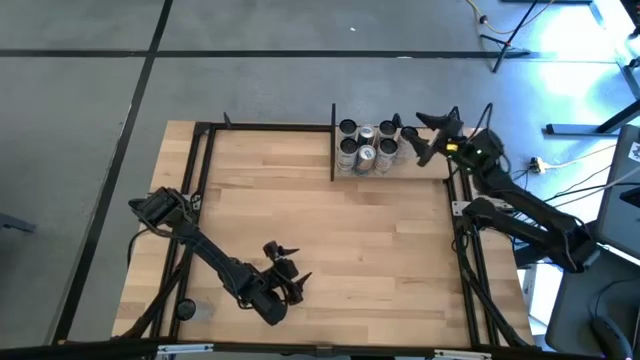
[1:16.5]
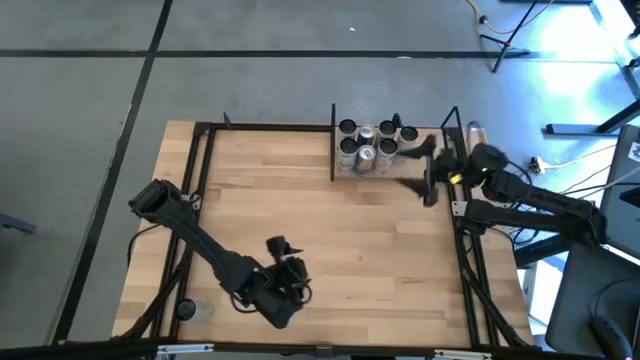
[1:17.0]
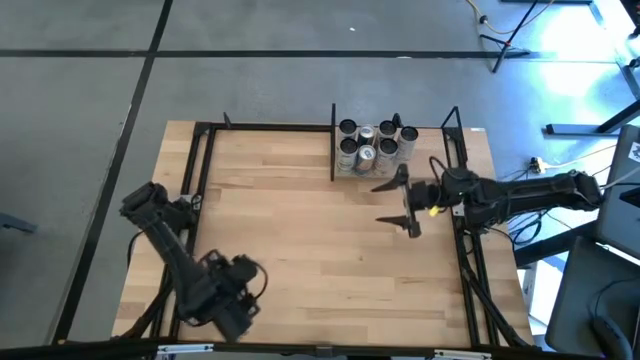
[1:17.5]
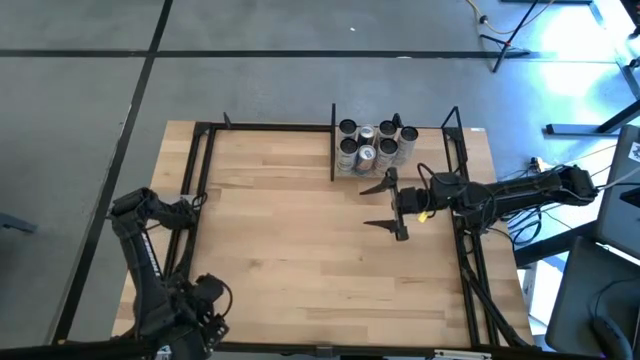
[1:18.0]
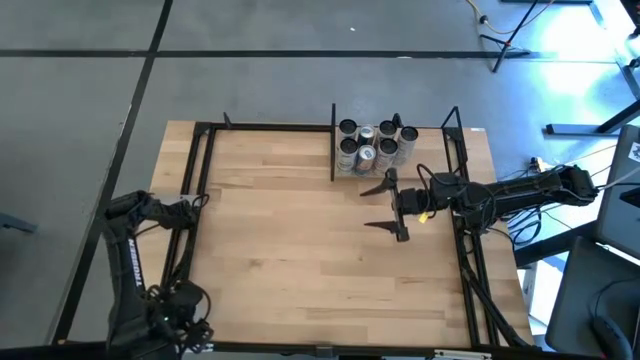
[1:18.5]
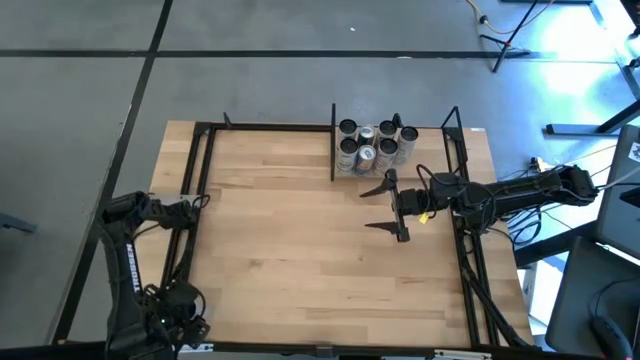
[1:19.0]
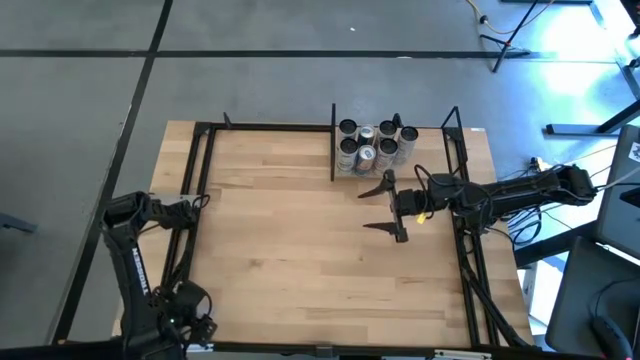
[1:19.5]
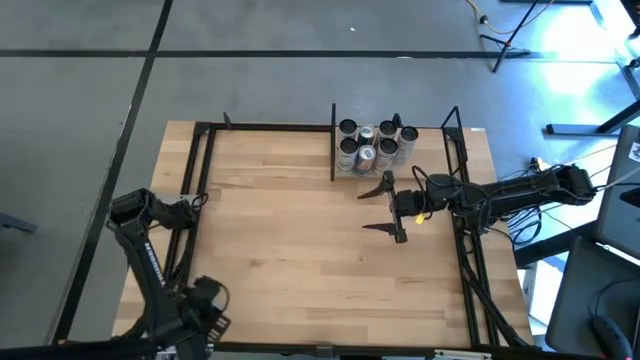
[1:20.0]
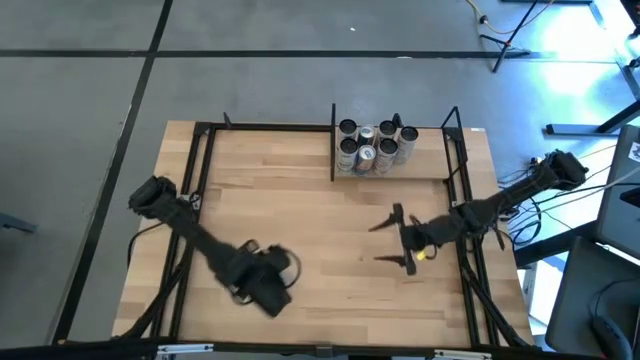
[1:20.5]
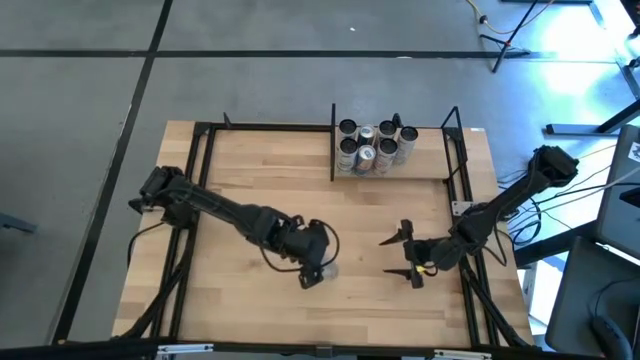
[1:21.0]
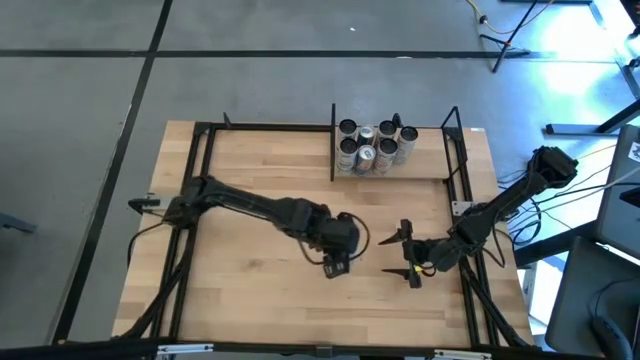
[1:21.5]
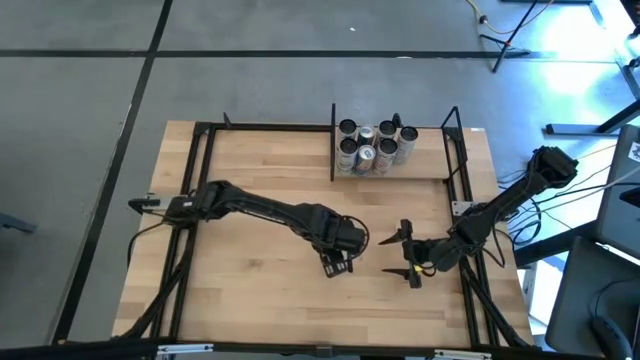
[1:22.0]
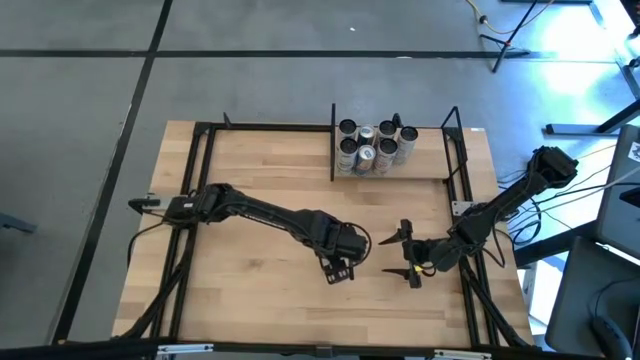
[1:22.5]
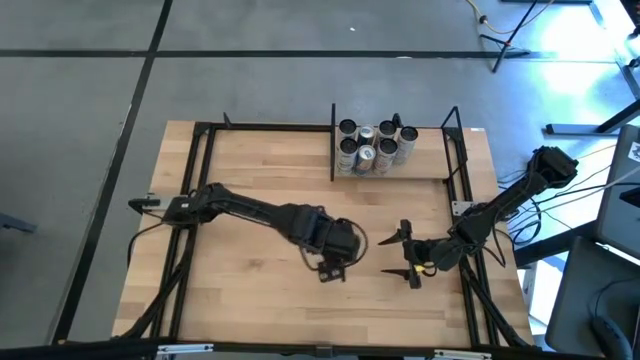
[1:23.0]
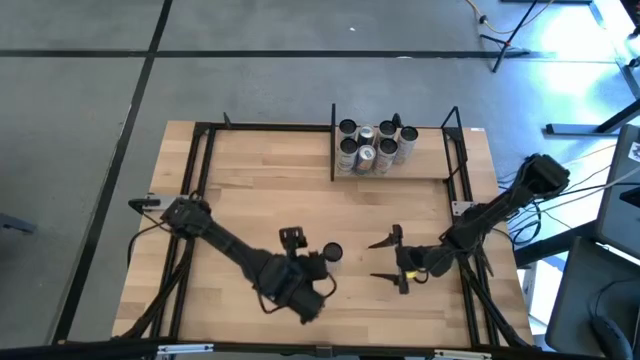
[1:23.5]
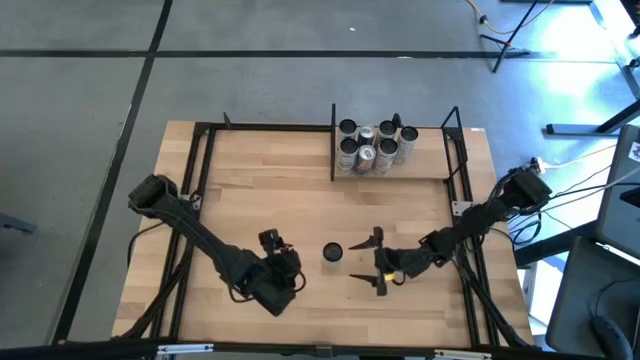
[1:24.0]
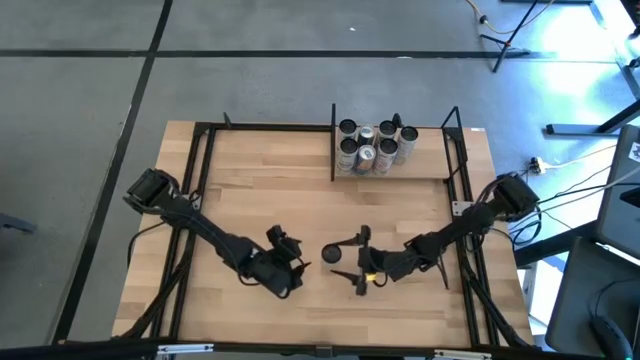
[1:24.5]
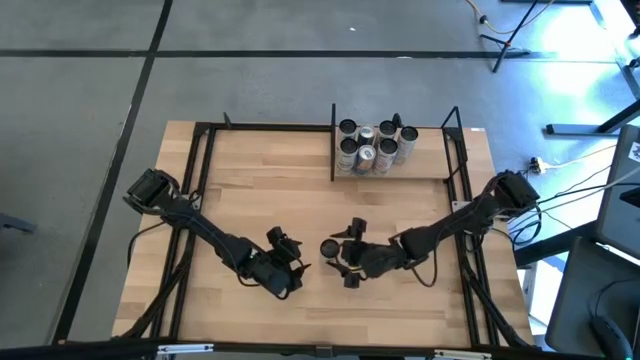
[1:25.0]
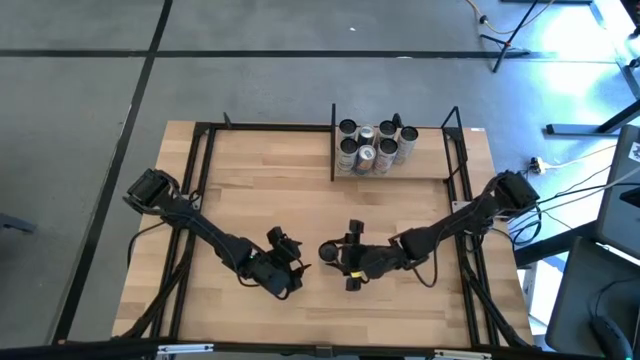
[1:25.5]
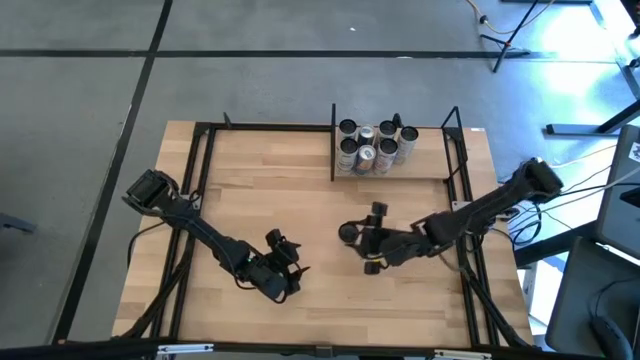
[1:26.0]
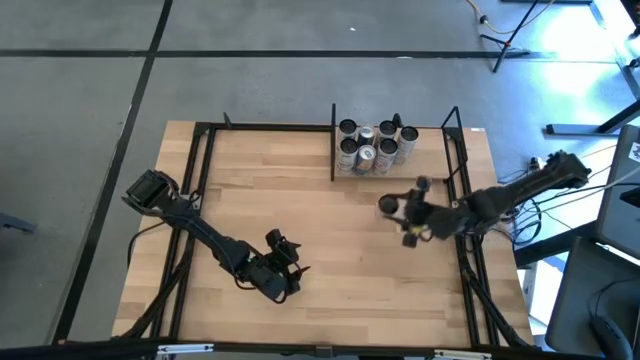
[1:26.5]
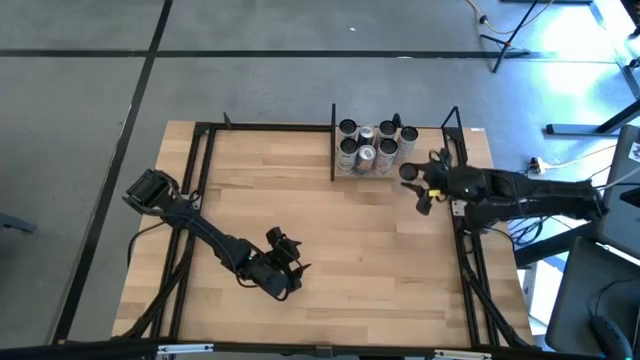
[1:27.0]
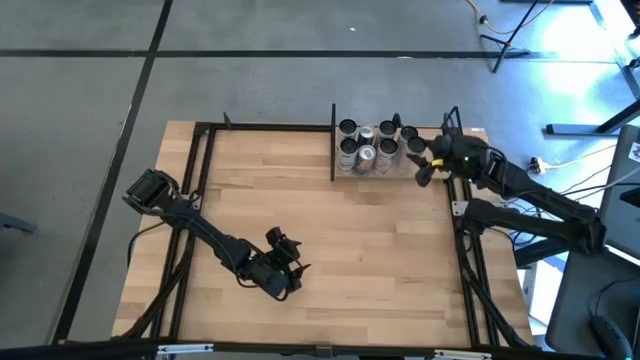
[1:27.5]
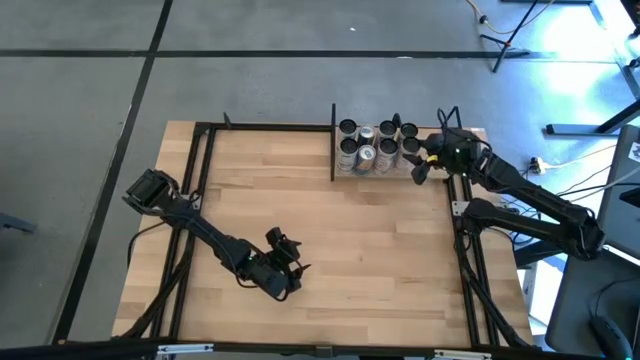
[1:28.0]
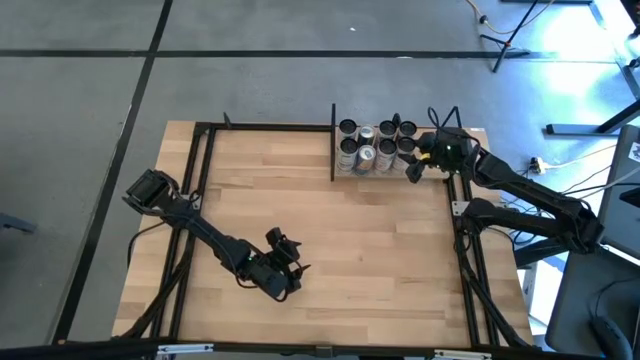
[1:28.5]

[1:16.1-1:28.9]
Task: Place canned beverage on shelf
Put the black soda can on the shelf aligned with the other black soda can

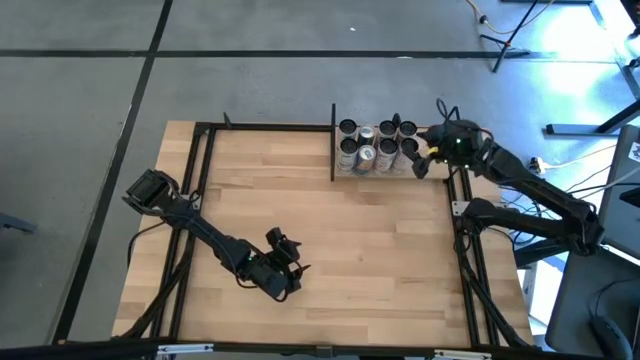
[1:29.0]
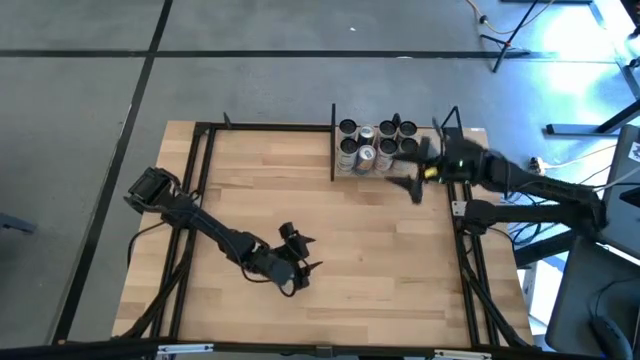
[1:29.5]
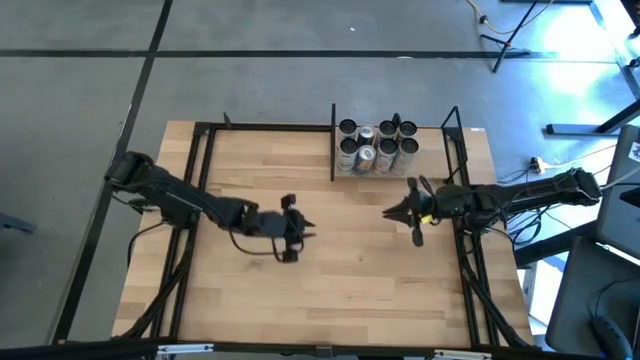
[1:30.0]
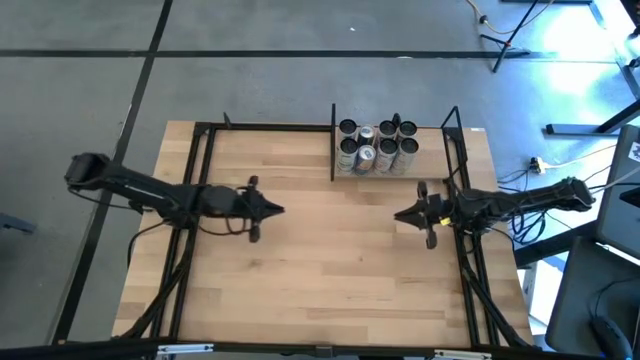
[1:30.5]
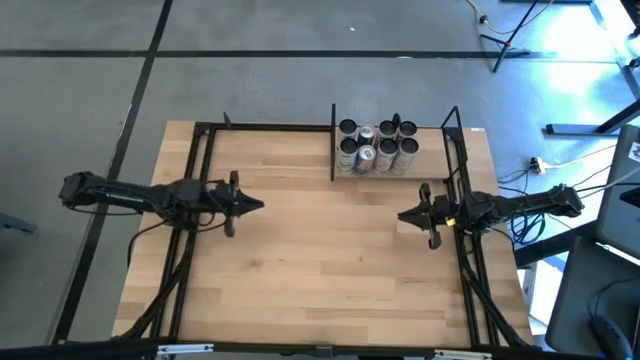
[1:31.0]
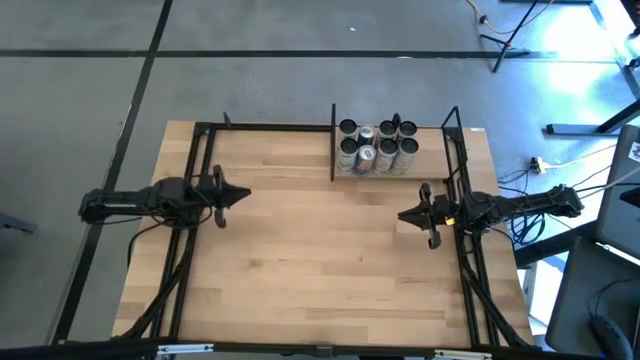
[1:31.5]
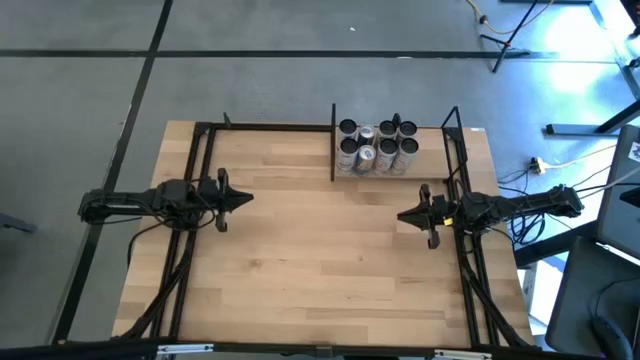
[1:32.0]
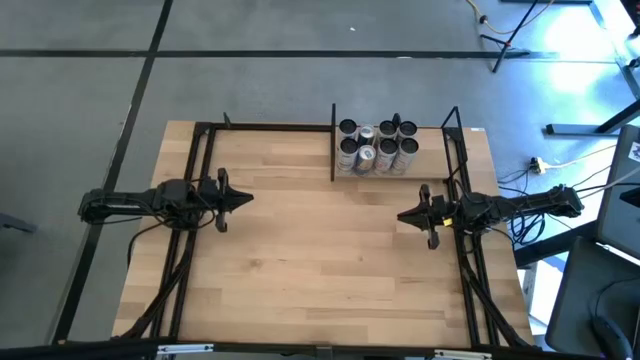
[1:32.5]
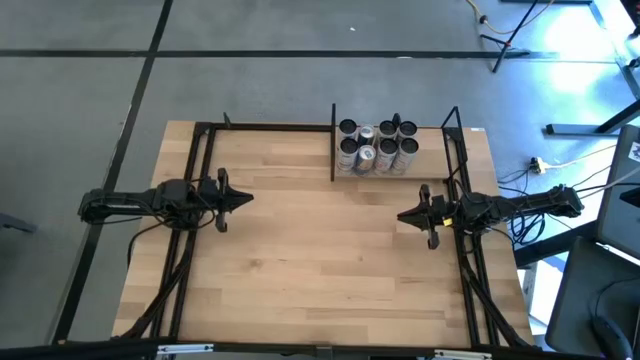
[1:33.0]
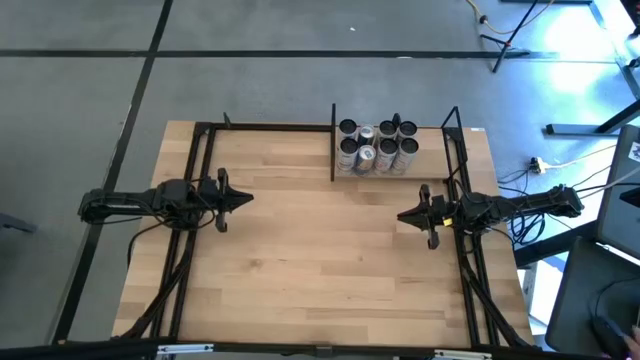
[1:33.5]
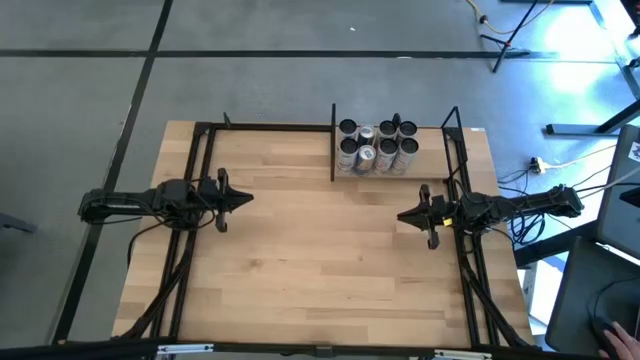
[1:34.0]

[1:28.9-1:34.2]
Return to Home Position

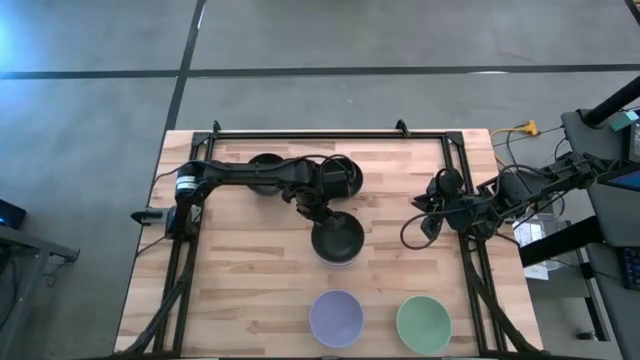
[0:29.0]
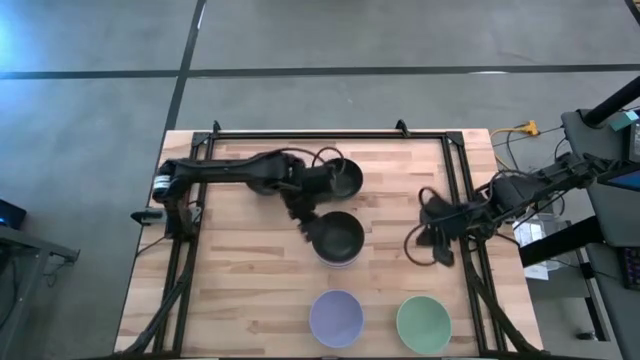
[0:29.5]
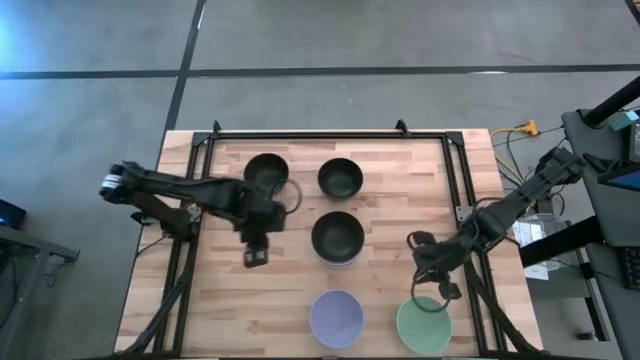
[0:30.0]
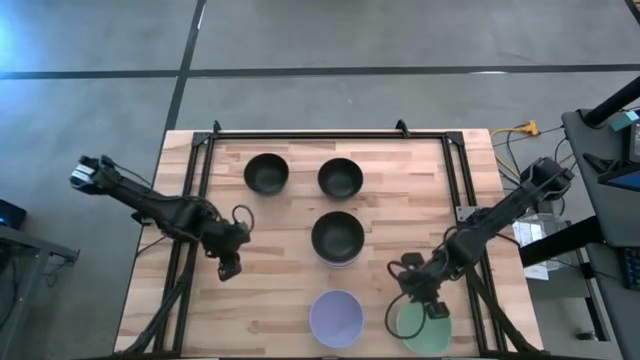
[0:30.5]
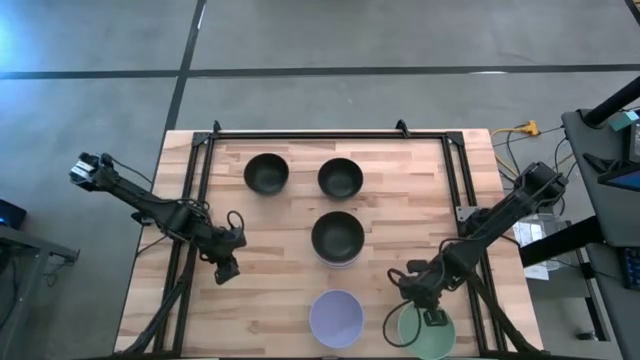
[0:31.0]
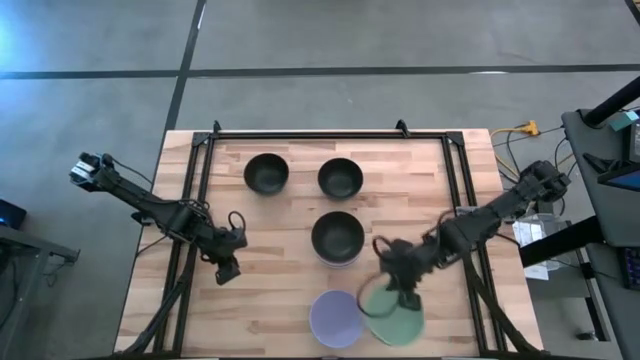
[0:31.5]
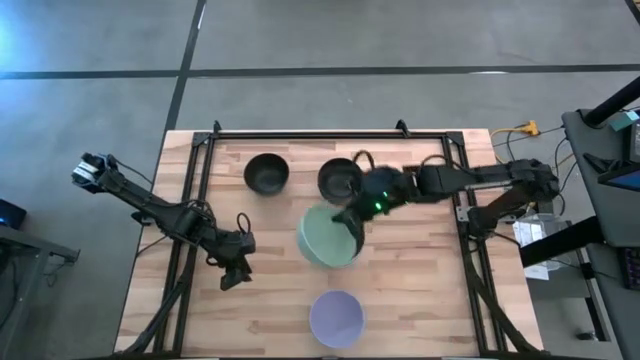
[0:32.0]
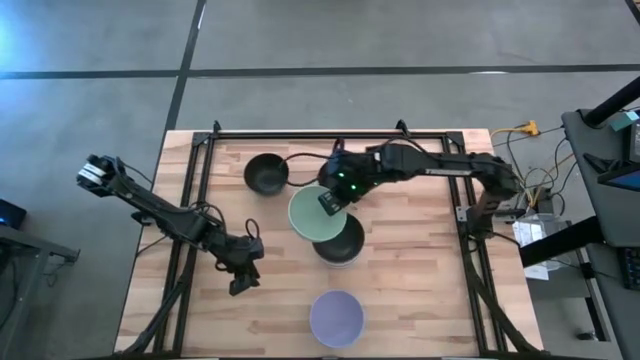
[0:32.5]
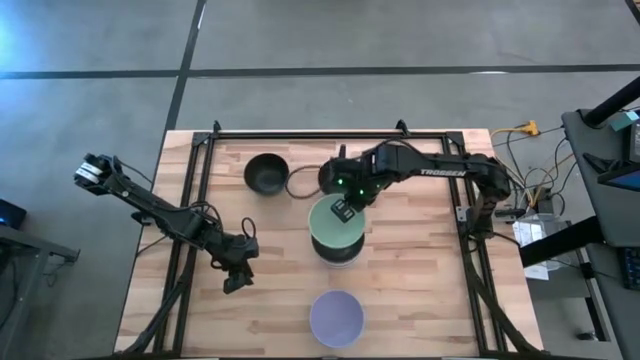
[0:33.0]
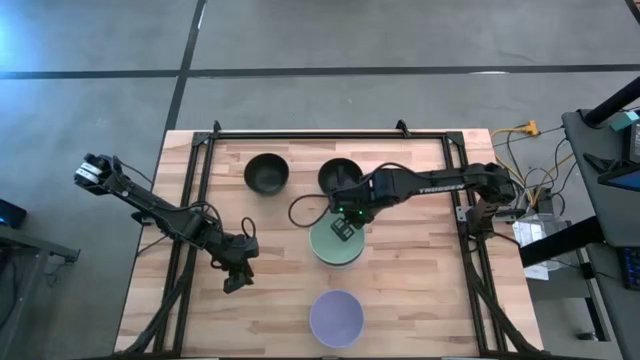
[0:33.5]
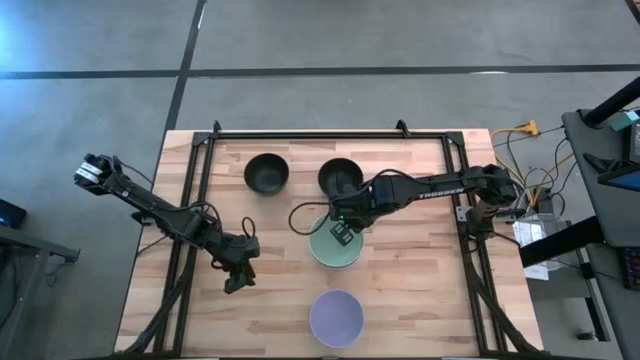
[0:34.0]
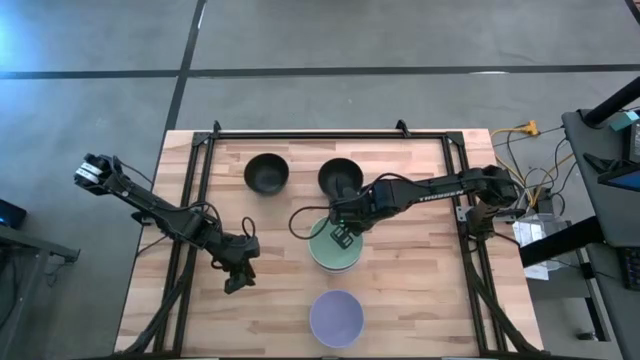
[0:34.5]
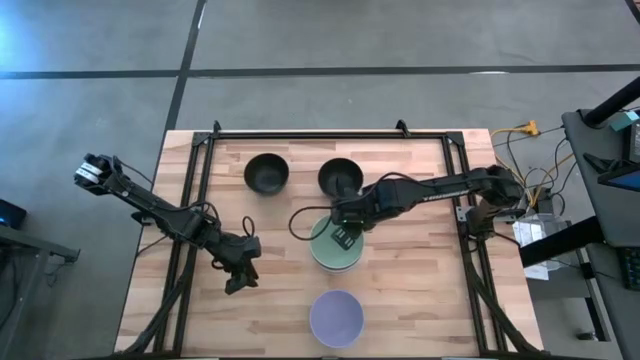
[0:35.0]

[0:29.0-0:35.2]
Task: Nest bowls inside each other
Stack the light green bowl on top of the black bowl
